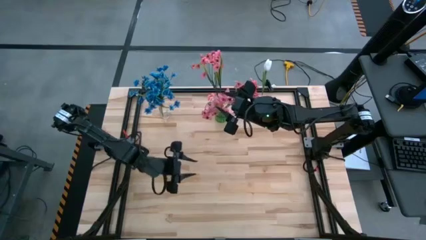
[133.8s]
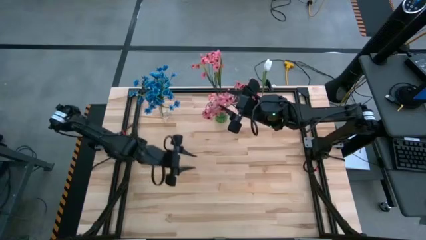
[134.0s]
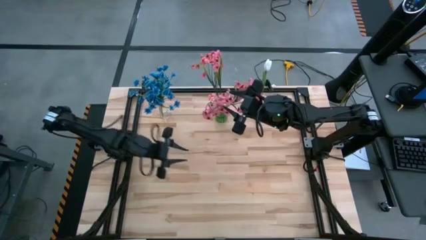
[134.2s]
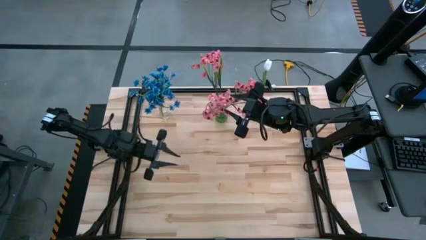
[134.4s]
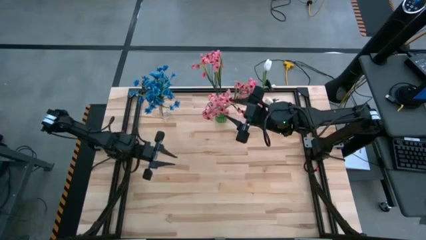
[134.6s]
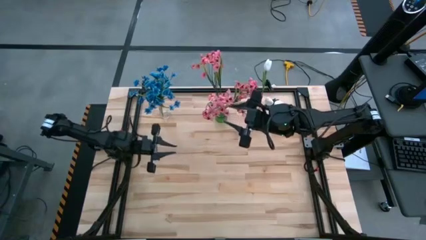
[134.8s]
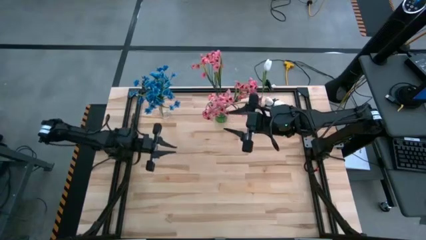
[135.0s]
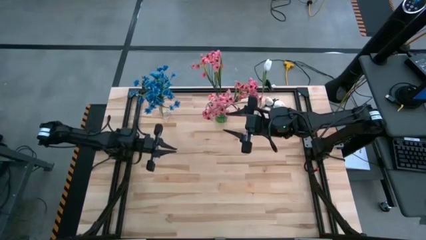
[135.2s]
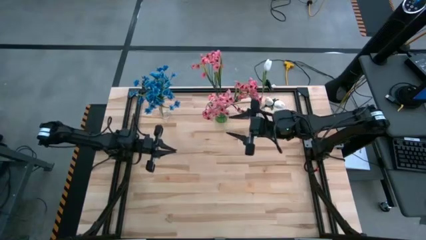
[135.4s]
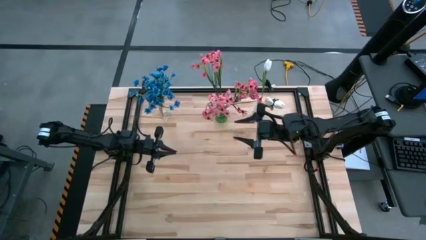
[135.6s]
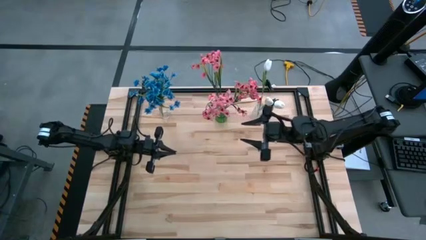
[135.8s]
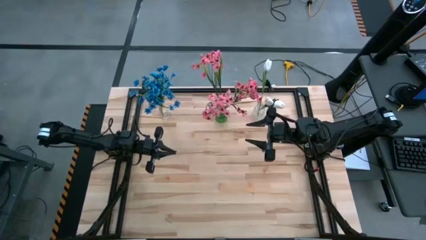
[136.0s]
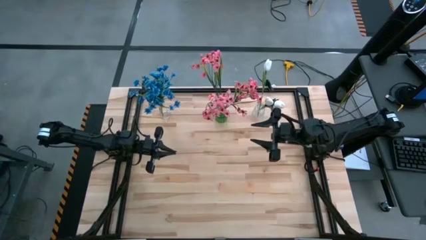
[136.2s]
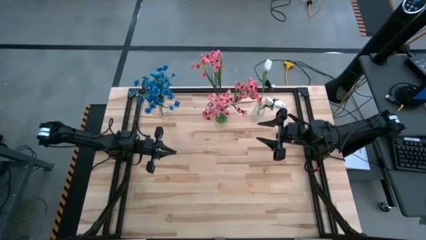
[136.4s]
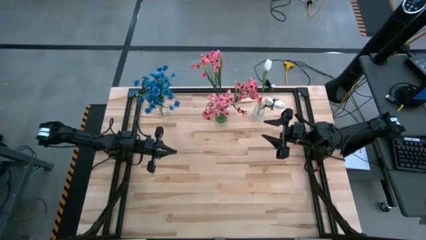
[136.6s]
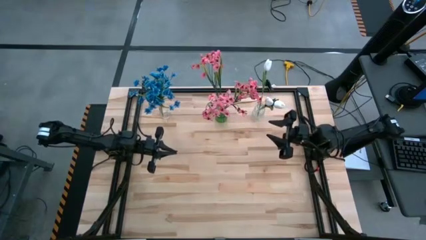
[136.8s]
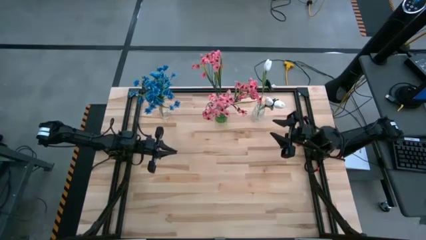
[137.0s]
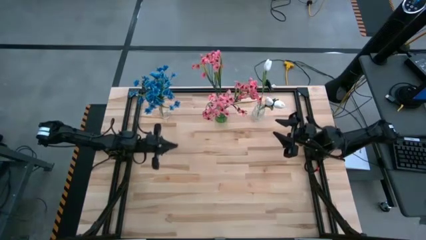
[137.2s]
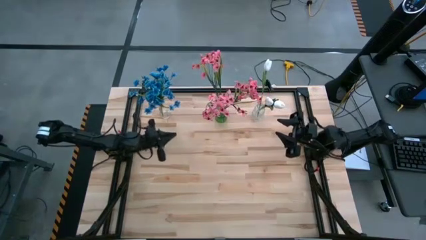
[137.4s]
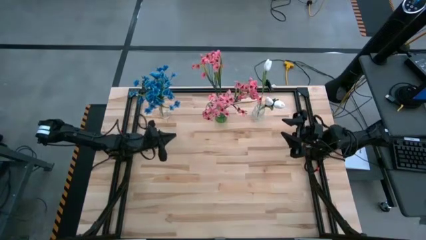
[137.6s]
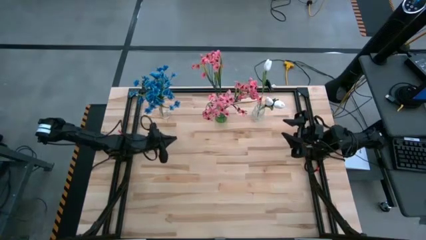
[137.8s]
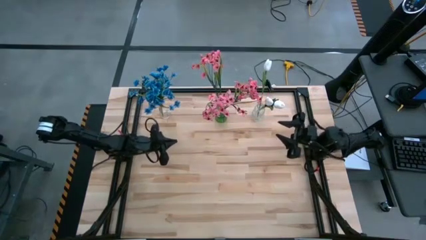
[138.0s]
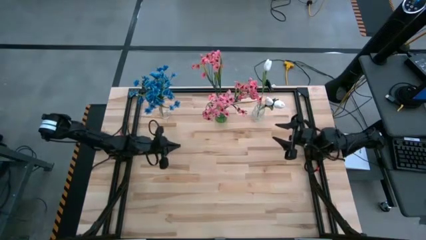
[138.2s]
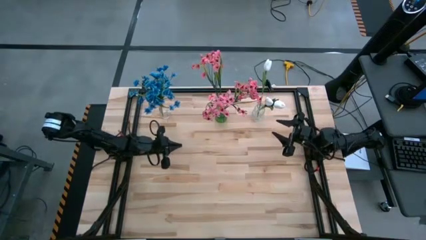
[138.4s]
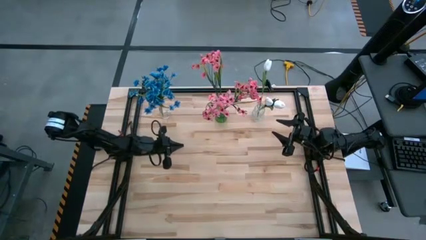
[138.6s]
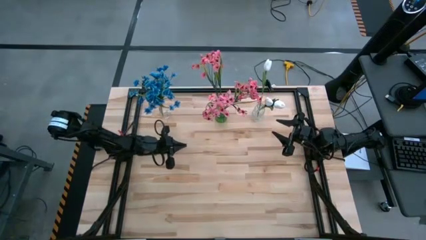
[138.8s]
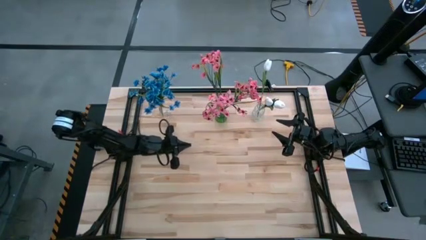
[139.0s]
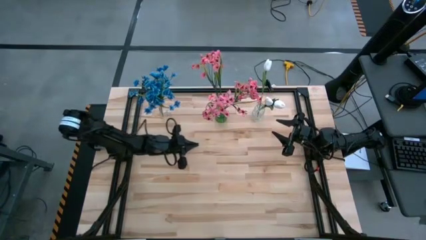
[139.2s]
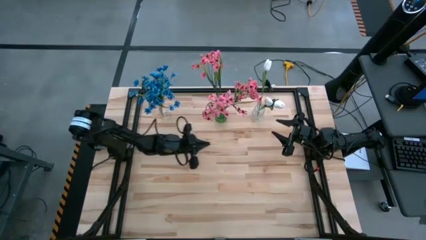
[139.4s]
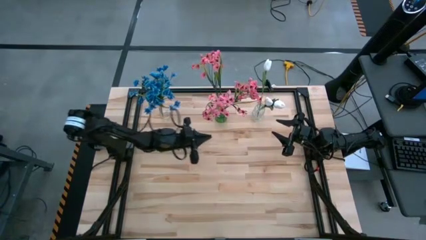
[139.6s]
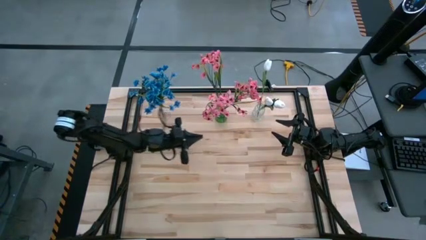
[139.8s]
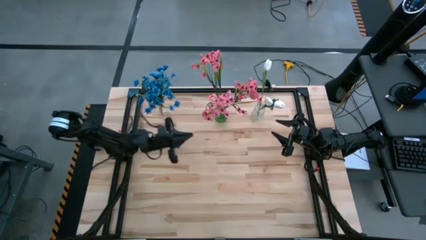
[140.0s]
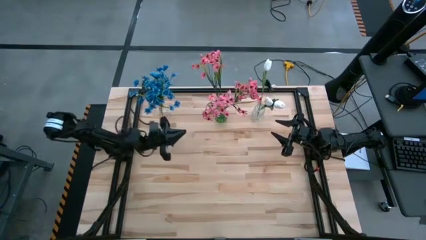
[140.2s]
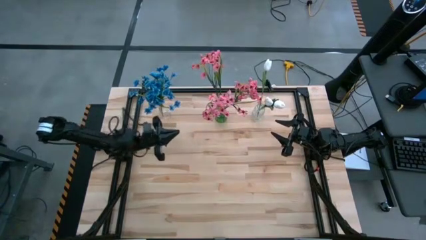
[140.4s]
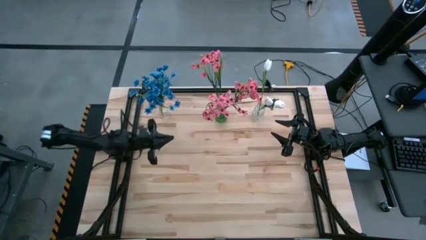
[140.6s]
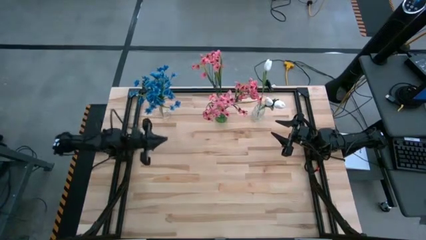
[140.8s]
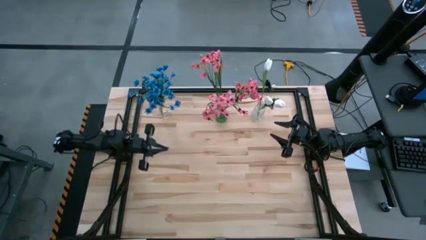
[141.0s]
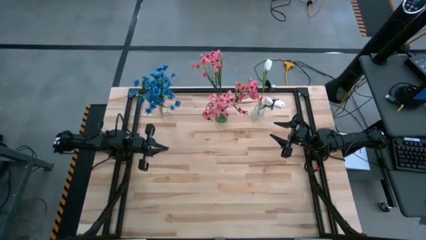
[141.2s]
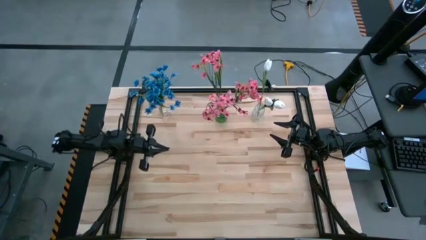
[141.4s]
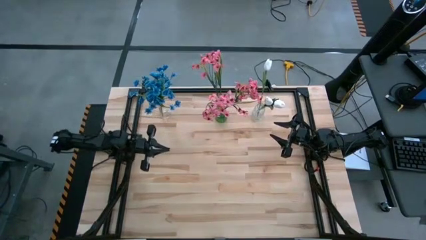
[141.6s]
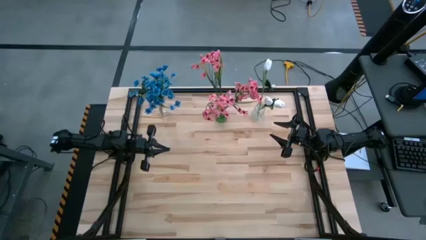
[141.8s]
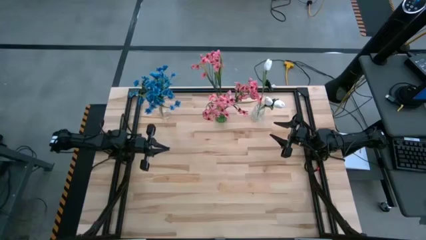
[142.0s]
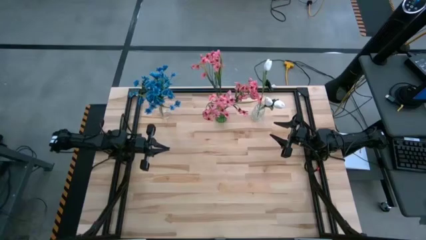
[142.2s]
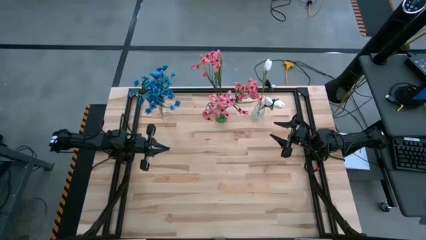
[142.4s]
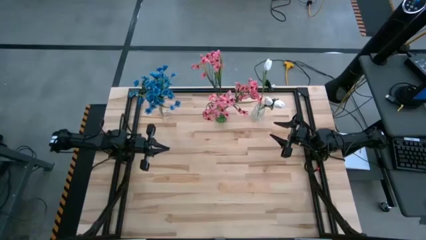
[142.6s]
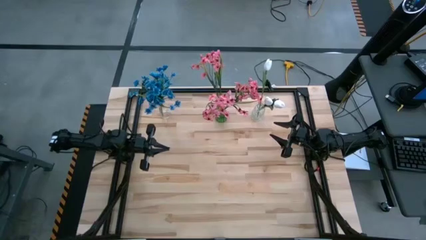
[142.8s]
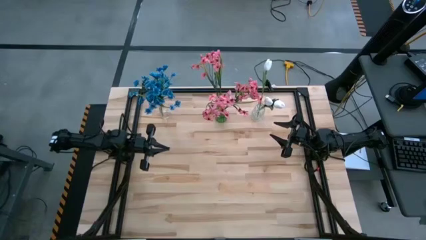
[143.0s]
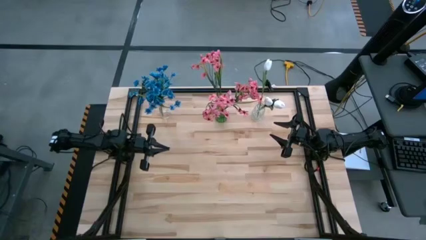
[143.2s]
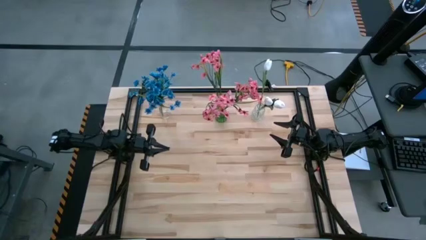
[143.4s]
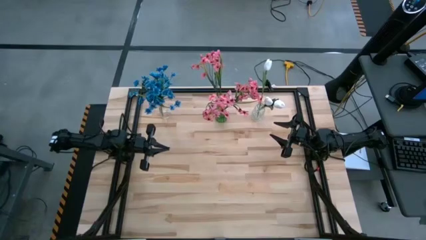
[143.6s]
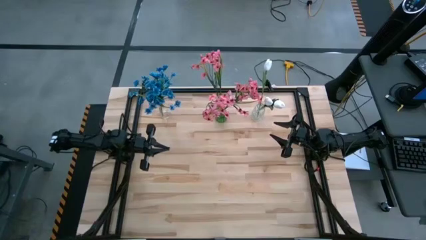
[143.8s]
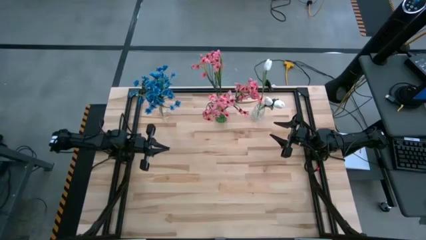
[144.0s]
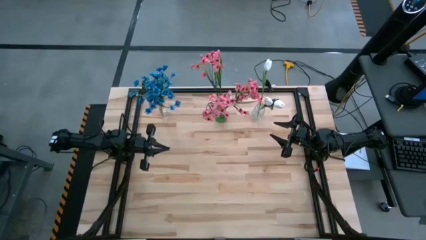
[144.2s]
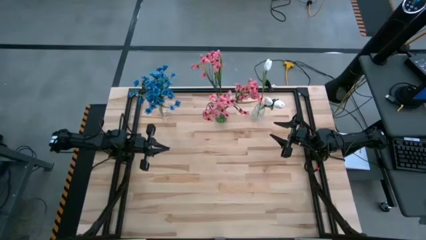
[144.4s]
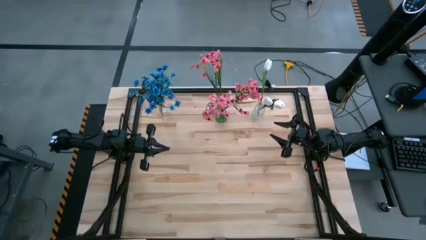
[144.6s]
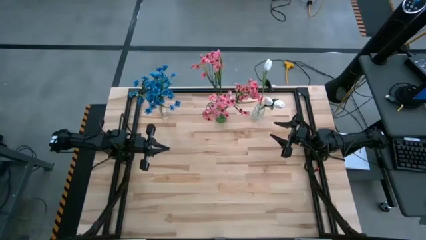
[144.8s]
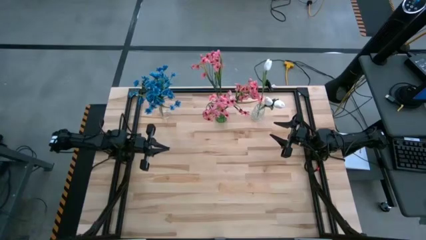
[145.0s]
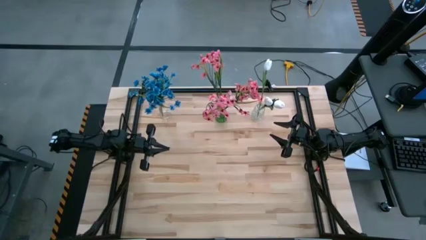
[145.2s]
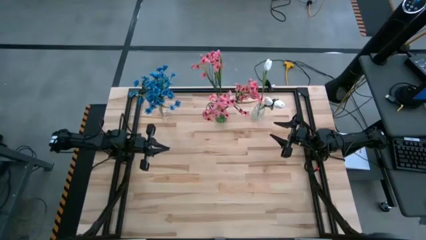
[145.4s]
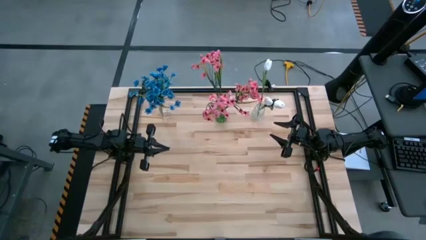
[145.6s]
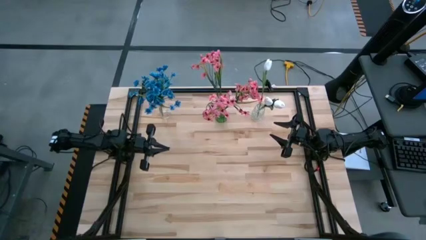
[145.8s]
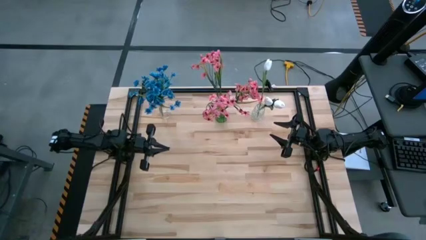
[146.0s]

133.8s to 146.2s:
Task: Sort flowers into vase by color
Return to Home Position
